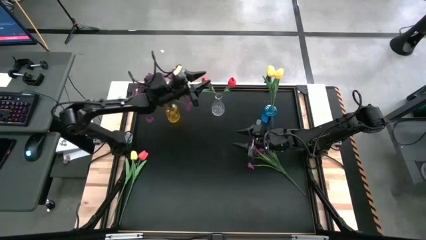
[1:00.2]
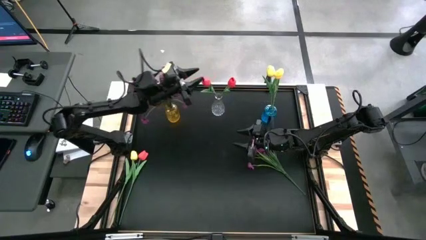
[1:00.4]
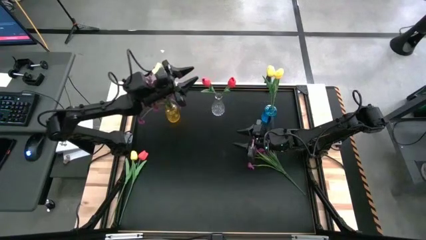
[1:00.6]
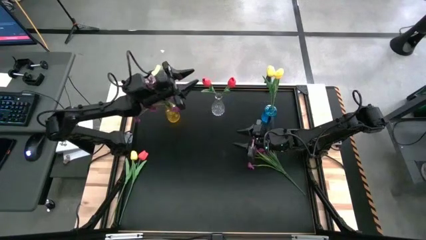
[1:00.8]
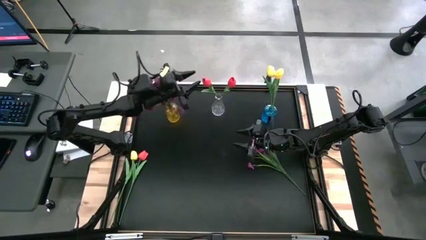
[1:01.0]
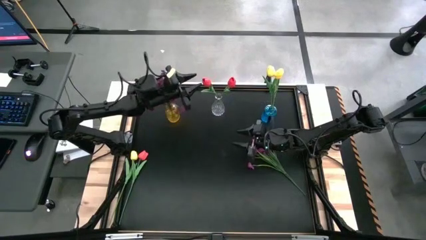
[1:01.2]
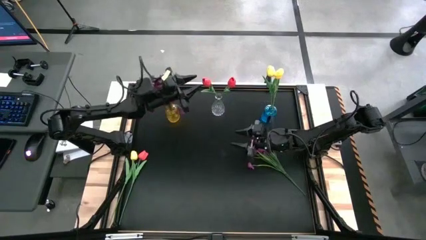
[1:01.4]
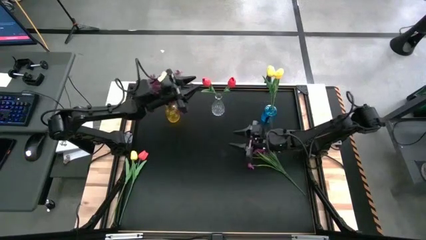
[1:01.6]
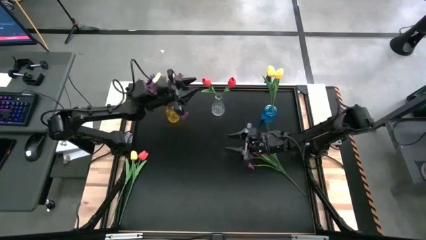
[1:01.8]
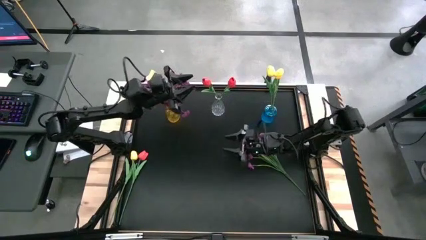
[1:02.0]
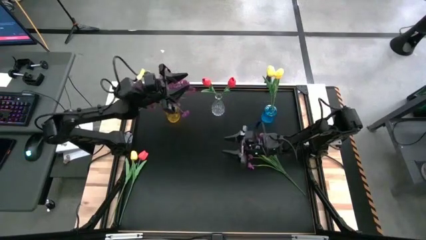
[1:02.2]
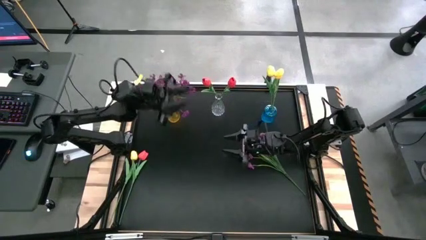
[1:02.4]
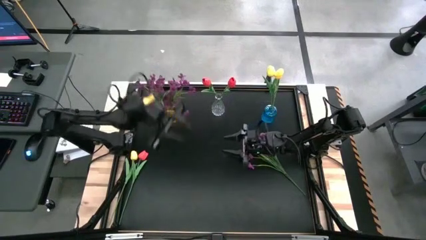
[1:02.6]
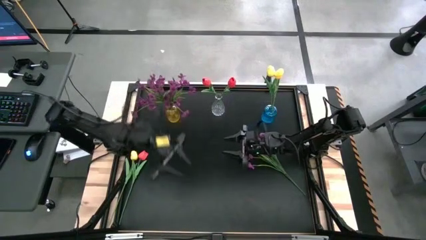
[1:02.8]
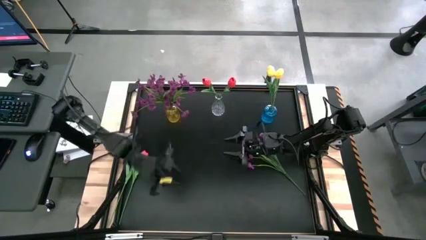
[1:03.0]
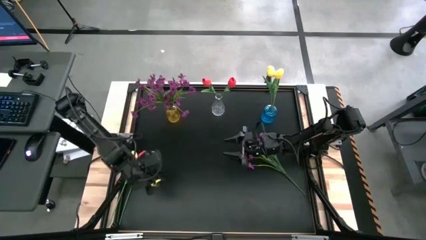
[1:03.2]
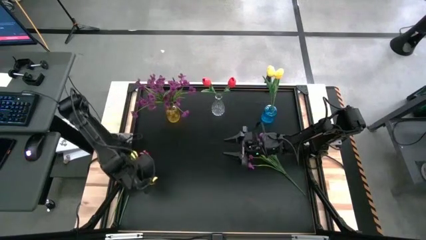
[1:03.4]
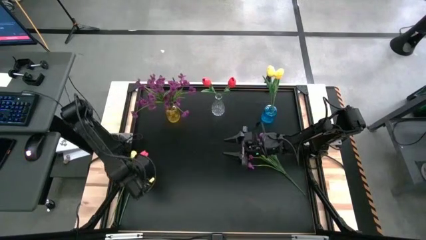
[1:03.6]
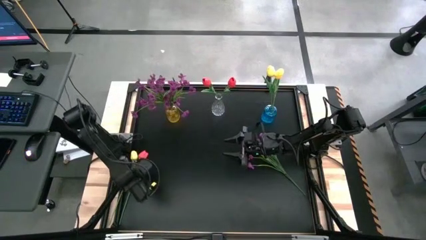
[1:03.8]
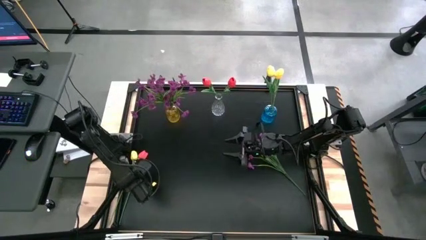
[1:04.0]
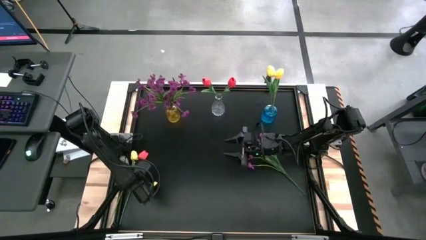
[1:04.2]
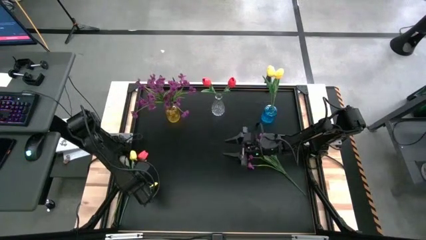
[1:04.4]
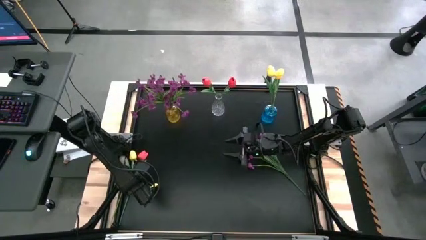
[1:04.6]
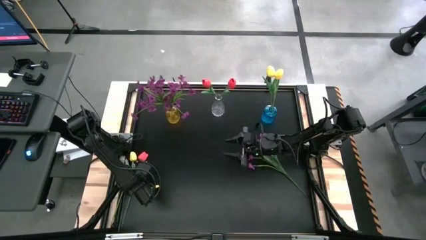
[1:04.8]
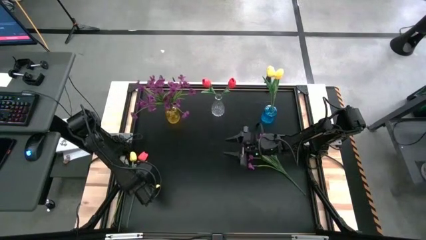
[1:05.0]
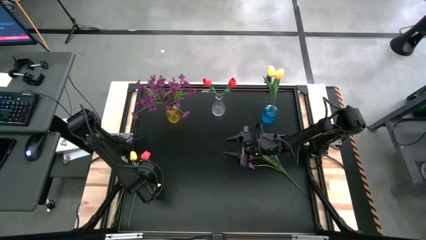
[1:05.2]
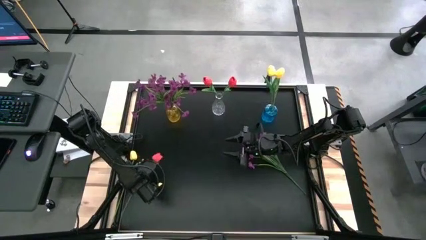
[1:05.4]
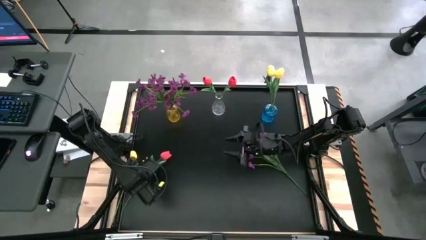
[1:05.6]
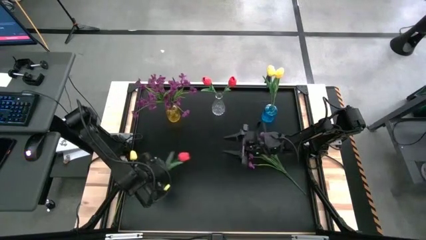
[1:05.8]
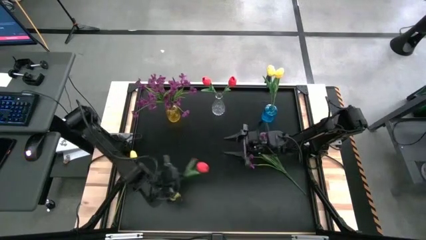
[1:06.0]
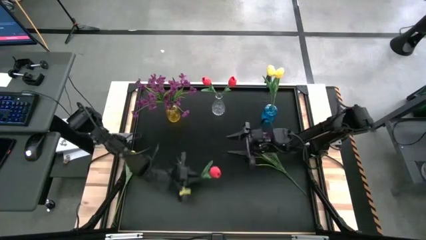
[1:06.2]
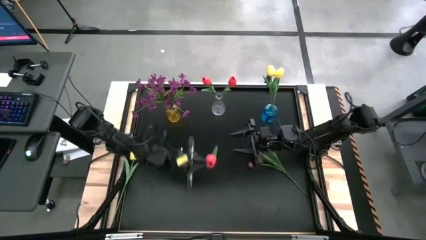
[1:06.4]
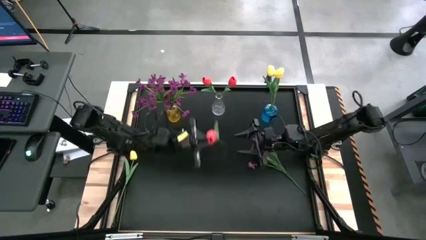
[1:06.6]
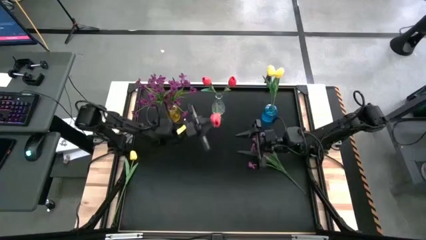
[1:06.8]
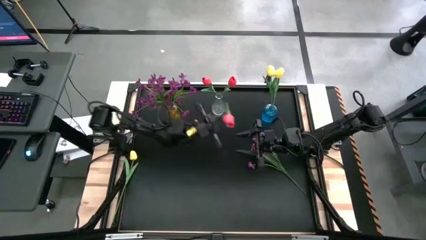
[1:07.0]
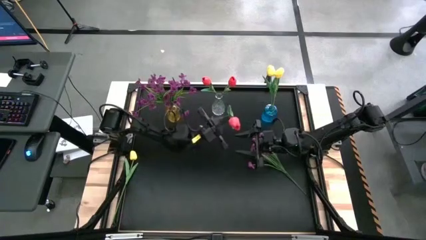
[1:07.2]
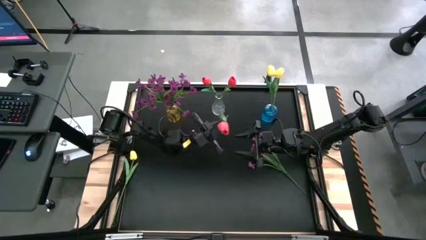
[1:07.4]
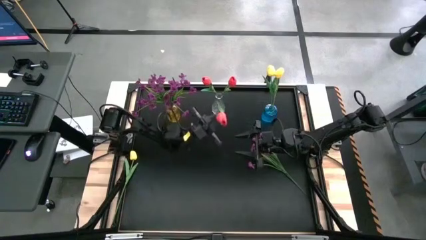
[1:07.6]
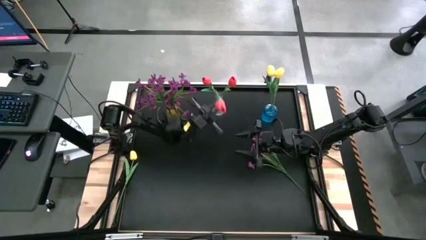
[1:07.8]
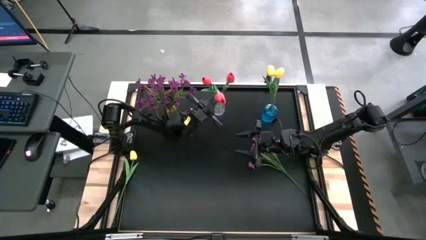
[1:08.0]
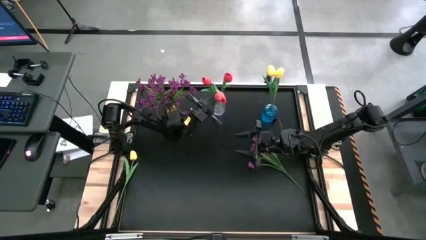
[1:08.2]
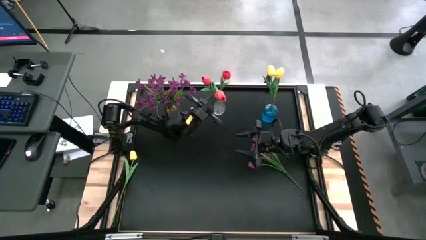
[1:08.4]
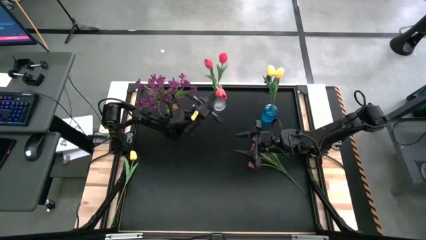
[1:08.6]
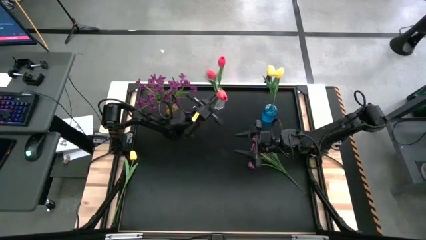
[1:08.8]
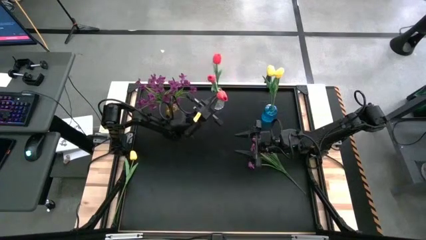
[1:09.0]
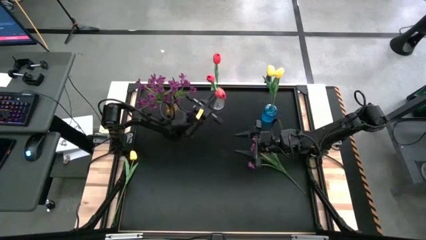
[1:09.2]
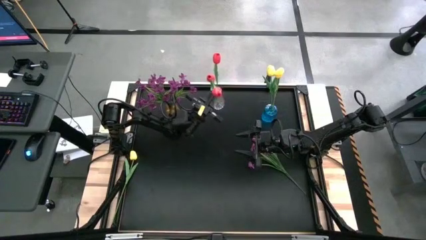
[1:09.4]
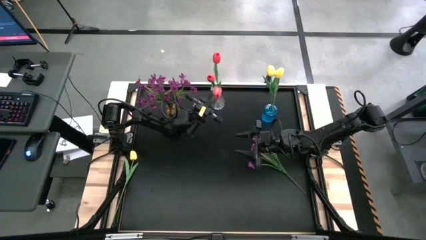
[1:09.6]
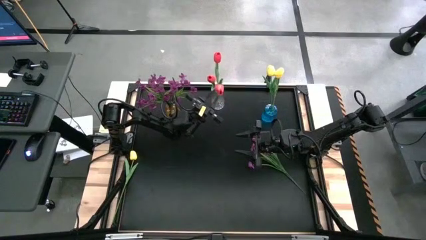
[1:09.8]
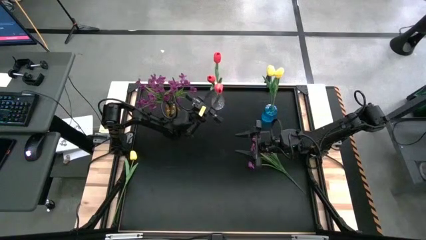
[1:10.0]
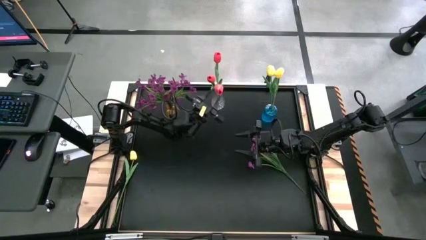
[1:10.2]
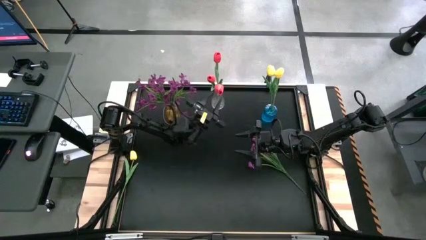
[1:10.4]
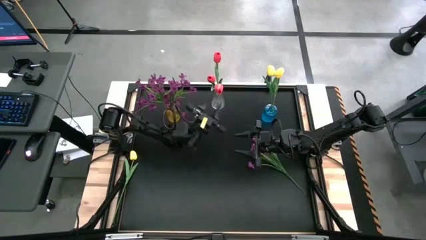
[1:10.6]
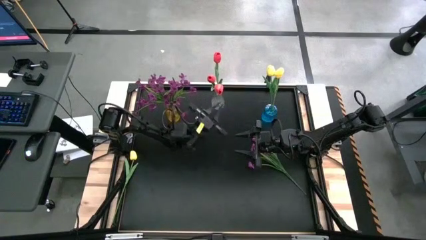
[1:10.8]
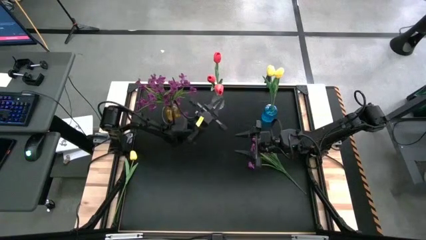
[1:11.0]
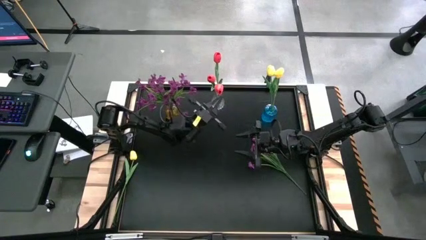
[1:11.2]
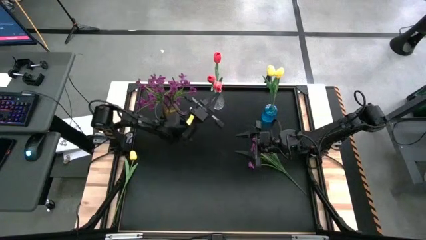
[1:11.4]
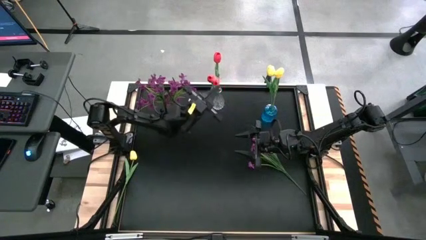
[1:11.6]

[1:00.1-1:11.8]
Task: Sort flowers into vase by color
Put the red flower into the transparent flower vase
